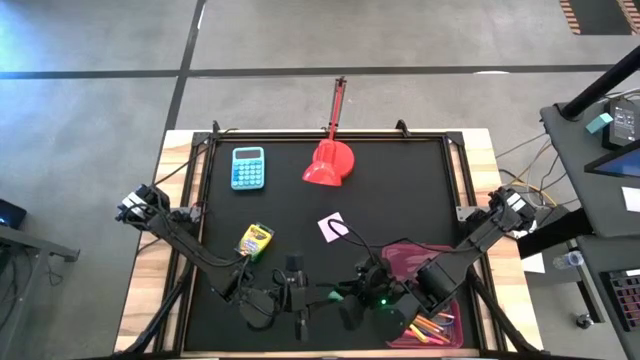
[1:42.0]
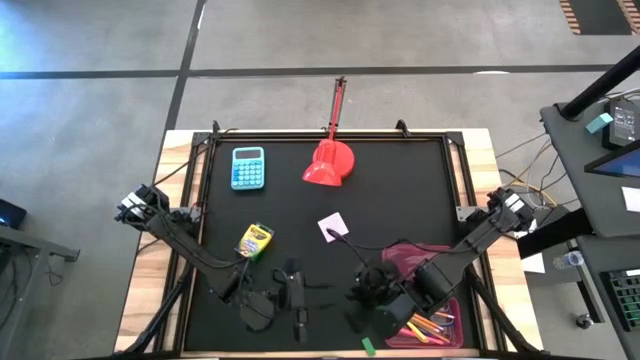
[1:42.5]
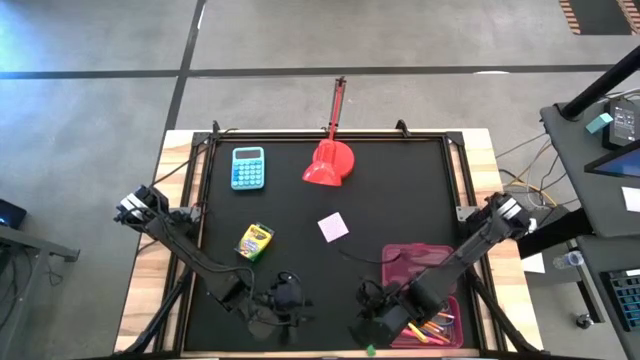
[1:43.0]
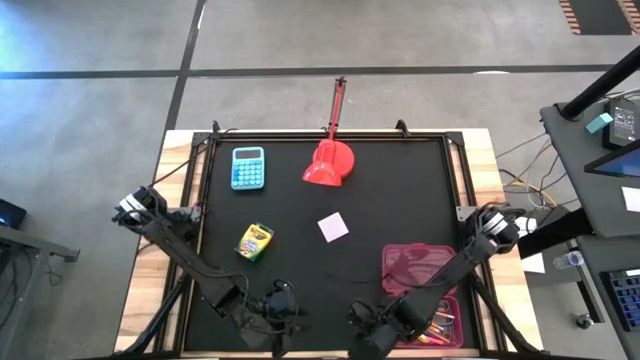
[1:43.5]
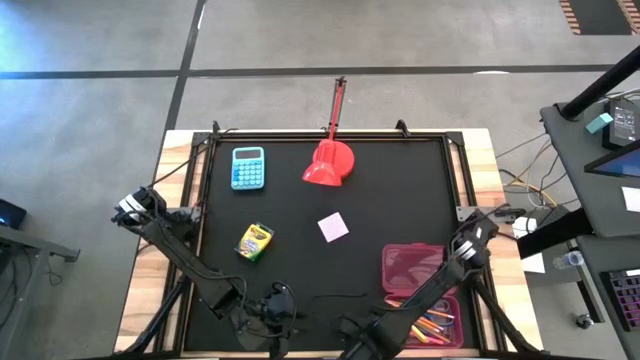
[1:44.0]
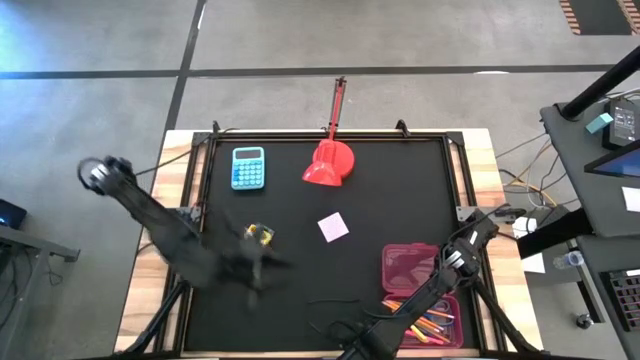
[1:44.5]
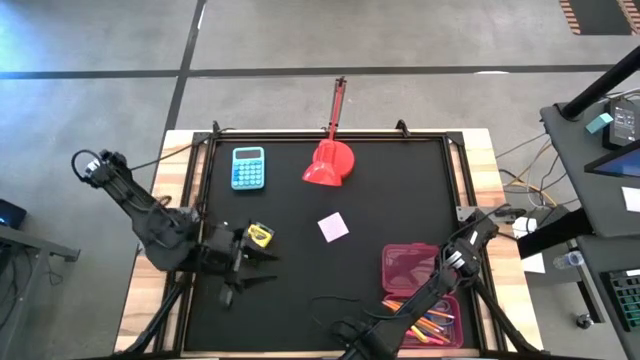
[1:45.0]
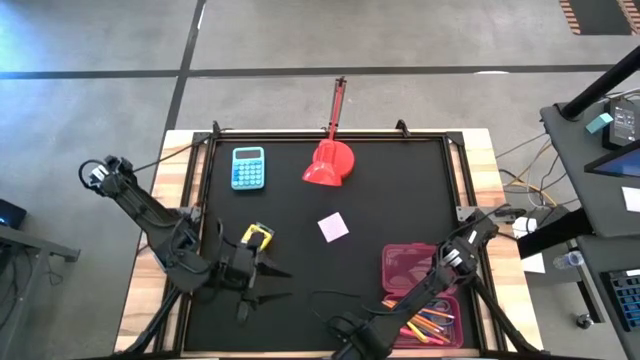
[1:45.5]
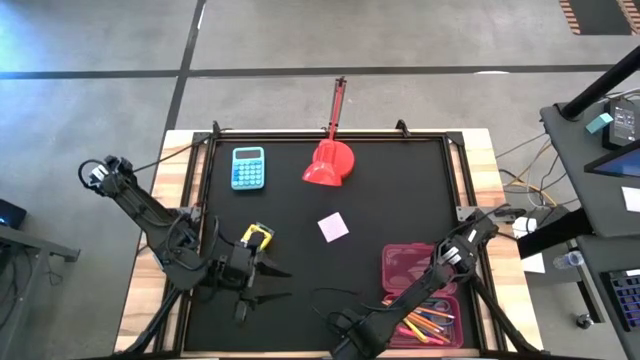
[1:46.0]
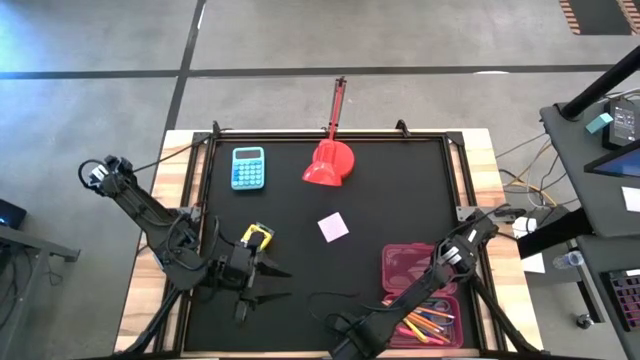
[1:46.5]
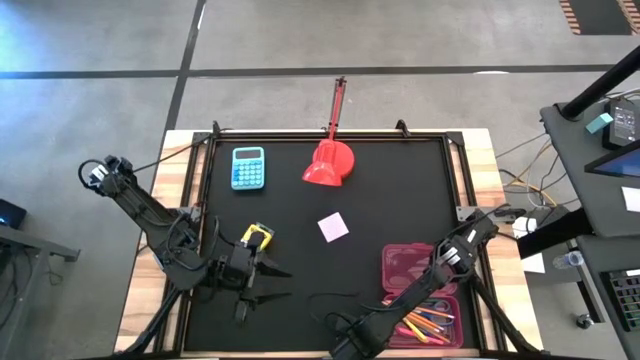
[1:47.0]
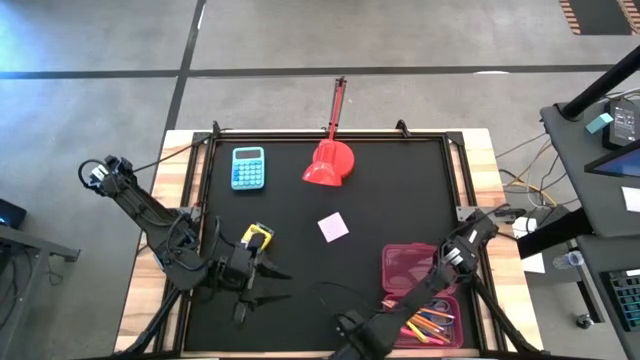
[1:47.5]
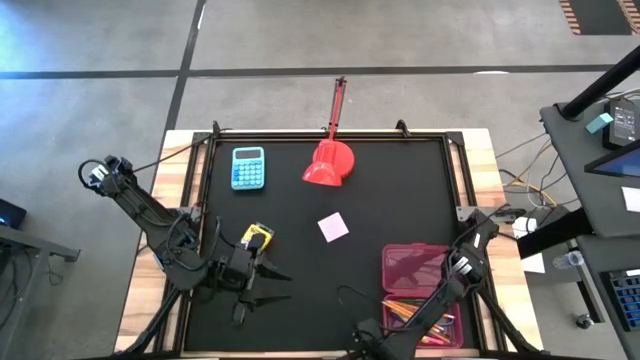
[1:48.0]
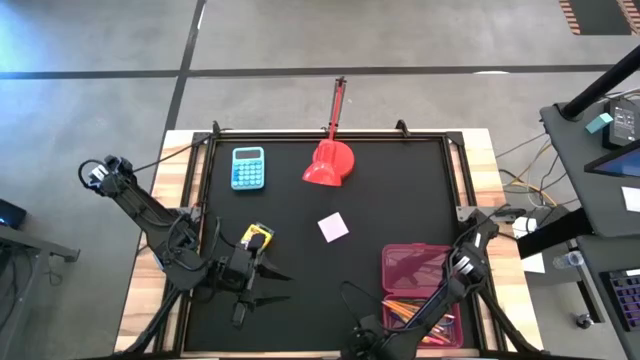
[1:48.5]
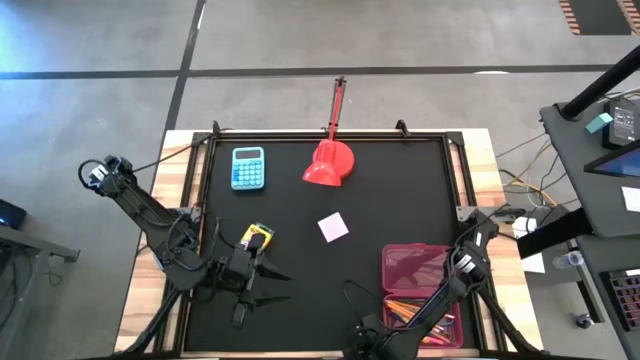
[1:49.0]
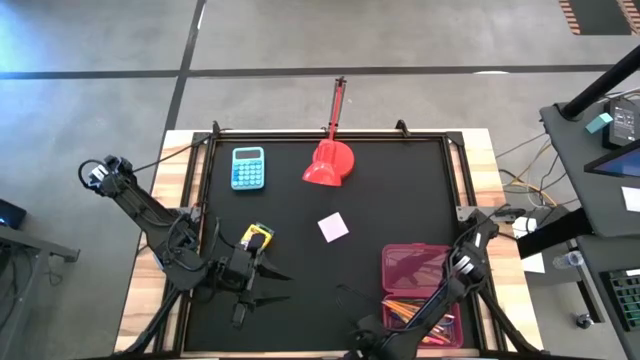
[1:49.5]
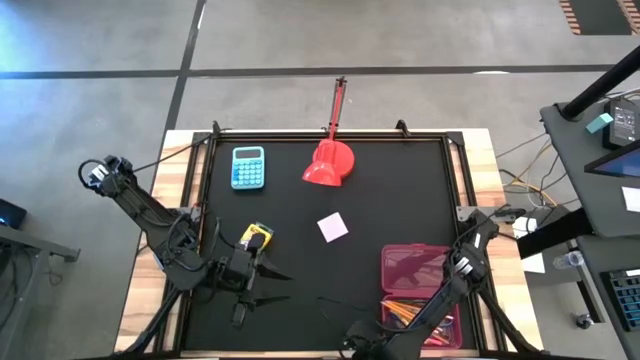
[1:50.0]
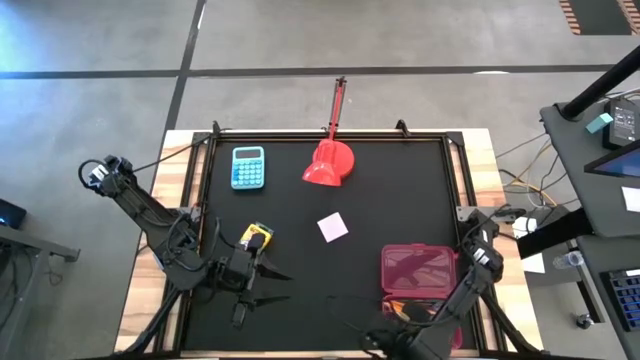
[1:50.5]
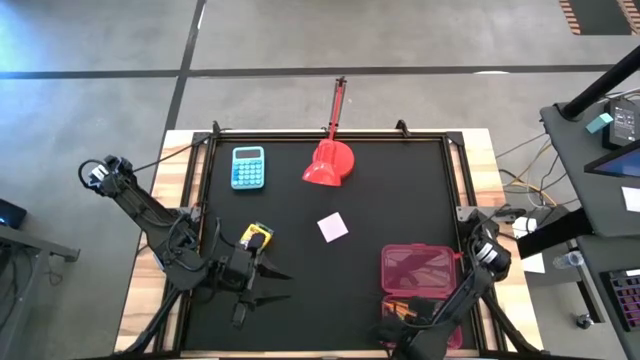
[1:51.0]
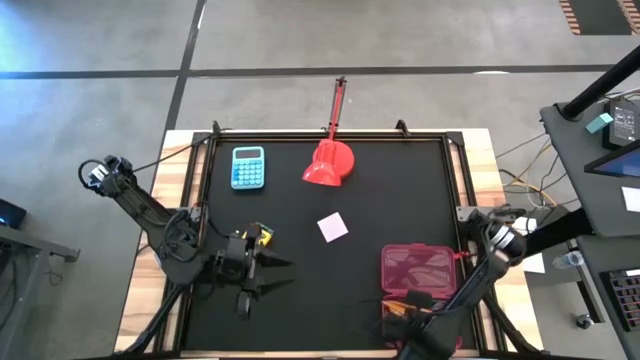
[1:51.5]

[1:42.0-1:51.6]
Task: Pack school essentials
Put the green eraser into the pink supply box

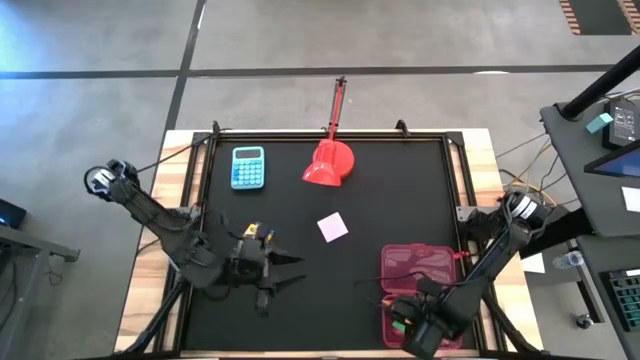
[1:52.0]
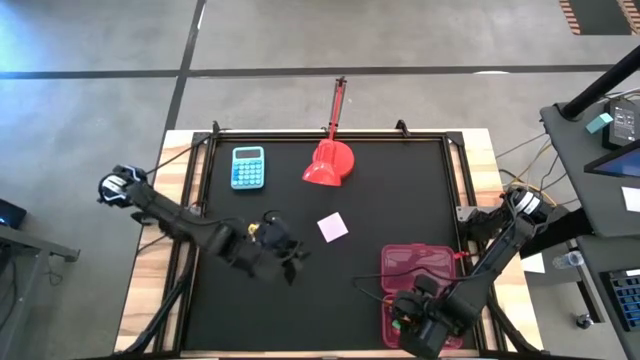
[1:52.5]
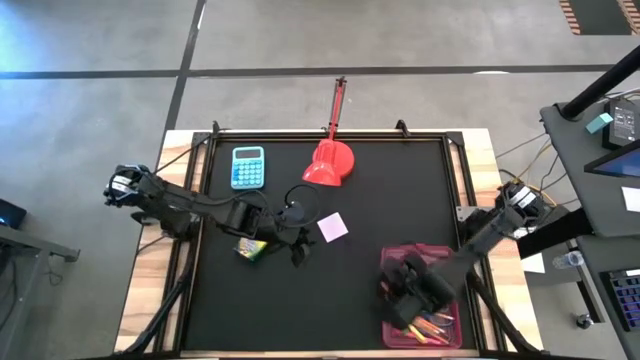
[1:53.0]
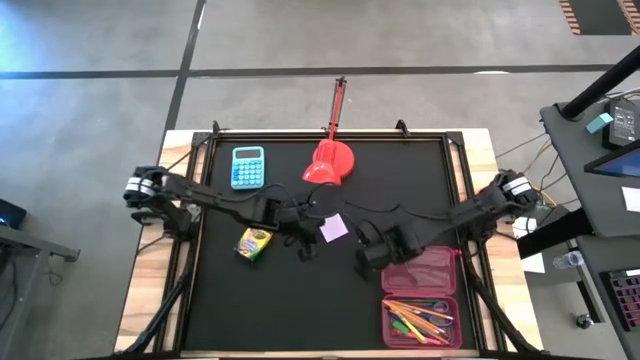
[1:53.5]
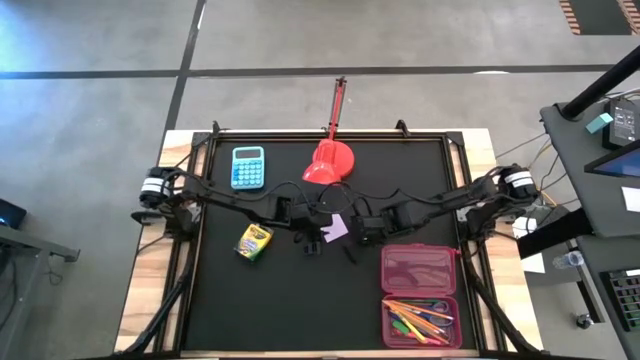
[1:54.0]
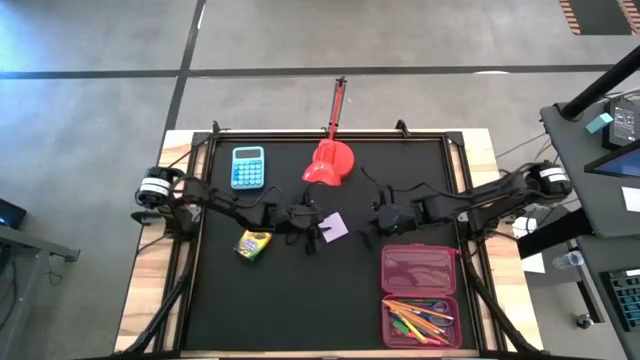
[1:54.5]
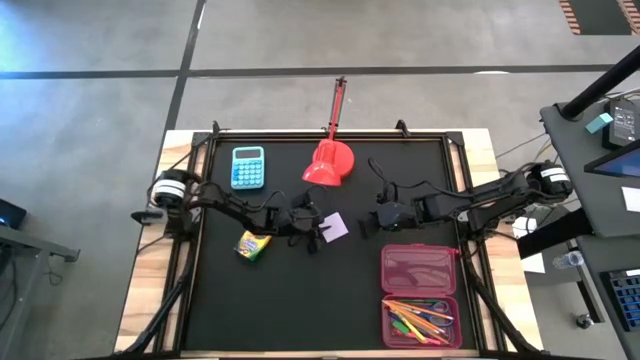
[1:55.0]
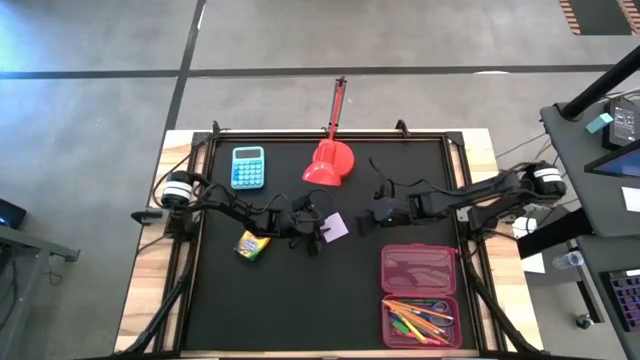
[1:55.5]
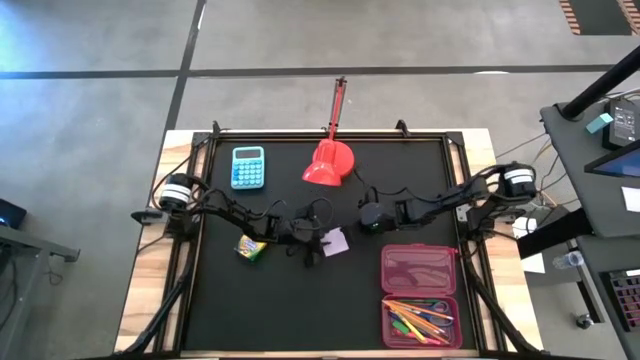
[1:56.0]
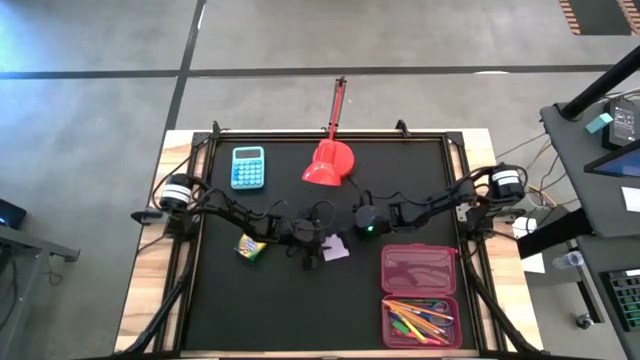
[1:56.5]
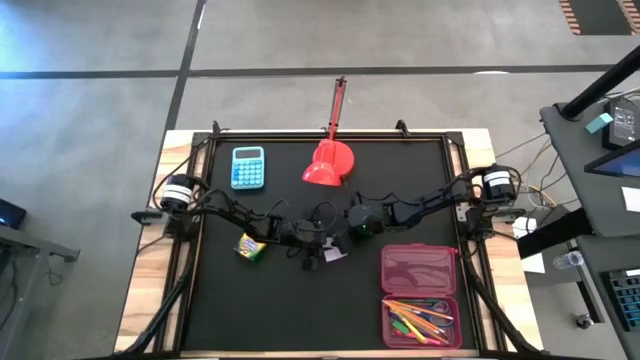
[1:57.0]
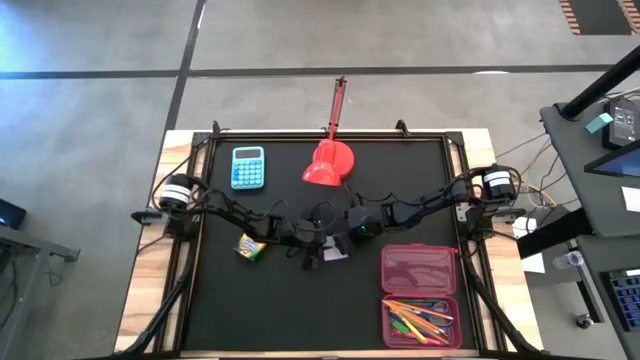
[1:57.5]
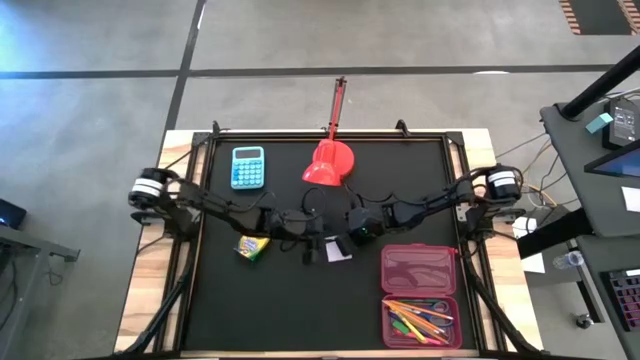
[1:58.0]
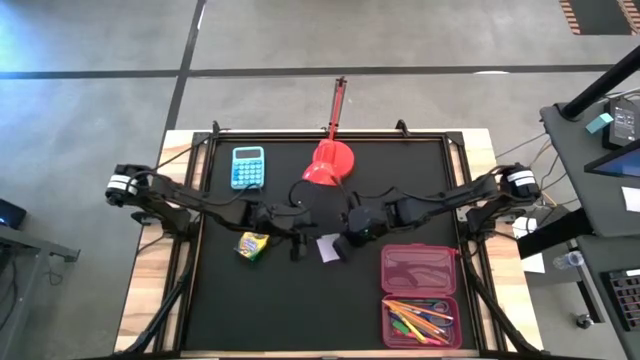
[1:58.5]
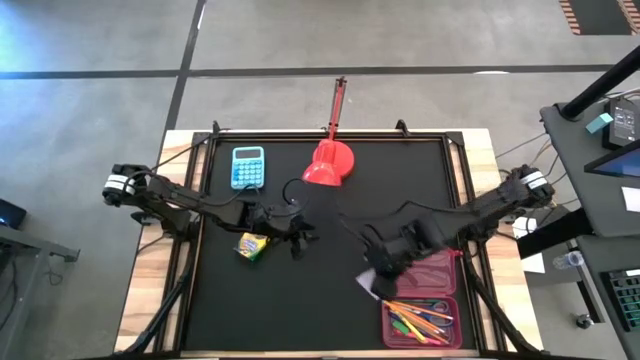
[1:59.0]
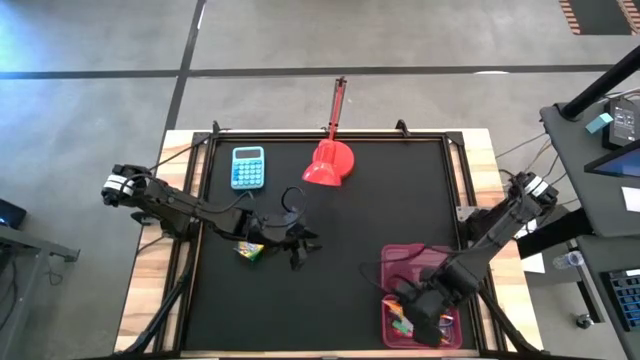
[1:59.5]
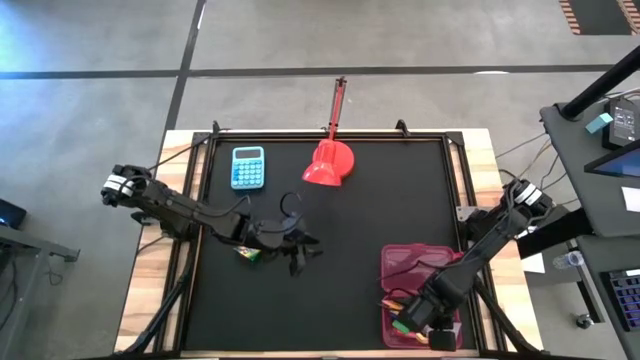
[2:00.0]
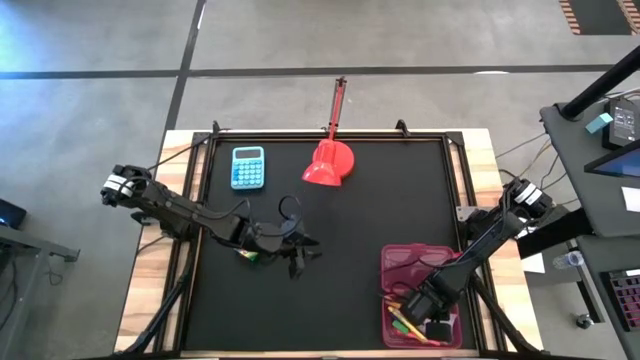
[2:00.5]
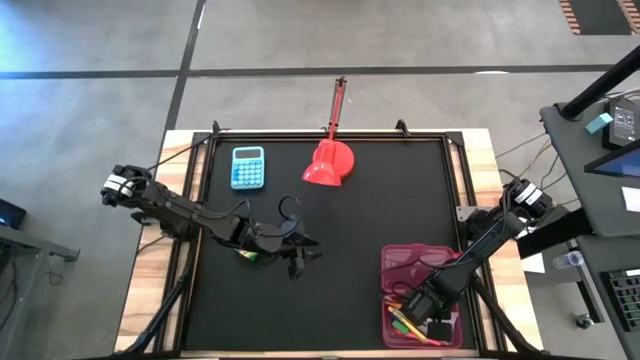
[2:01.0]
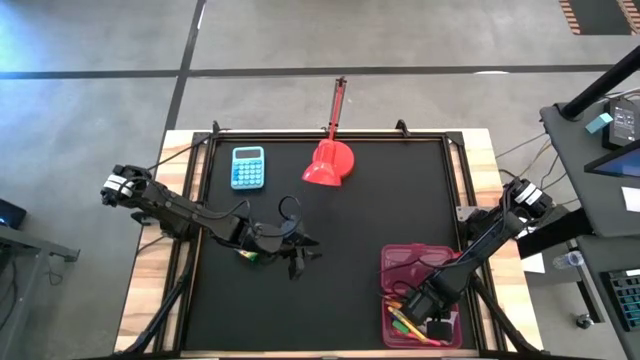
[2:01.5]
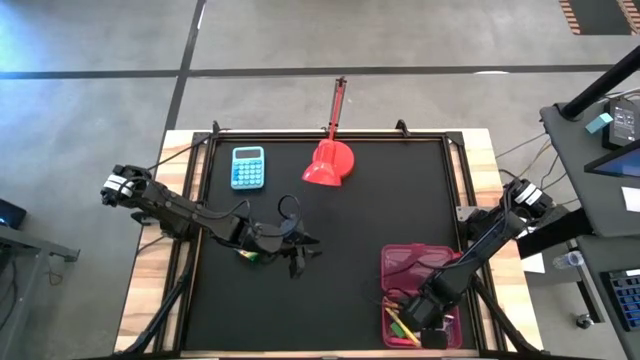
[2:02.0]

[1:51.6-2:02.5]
Put the violet sticky note into the pink supply box

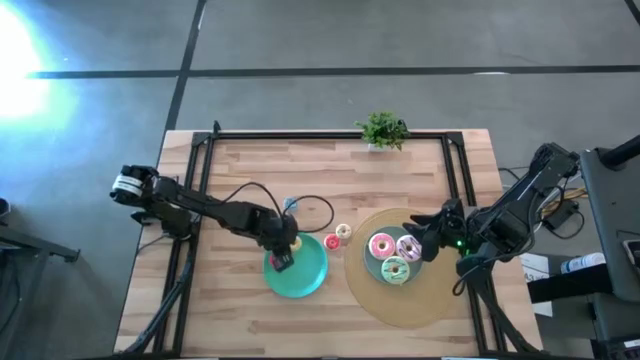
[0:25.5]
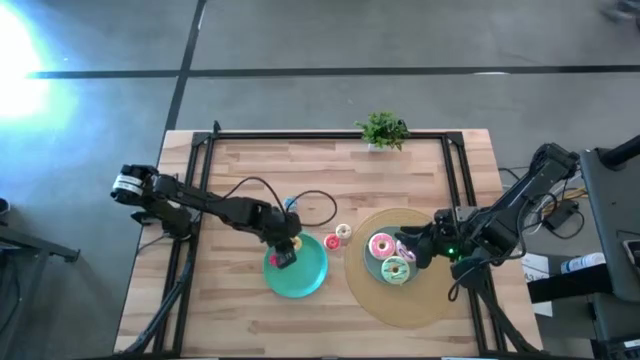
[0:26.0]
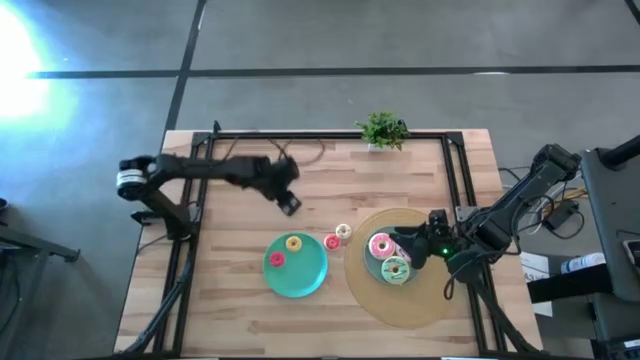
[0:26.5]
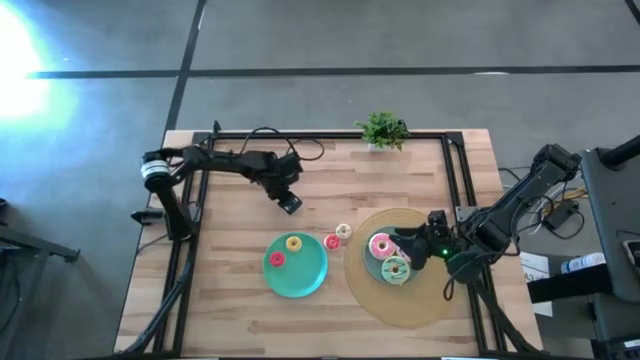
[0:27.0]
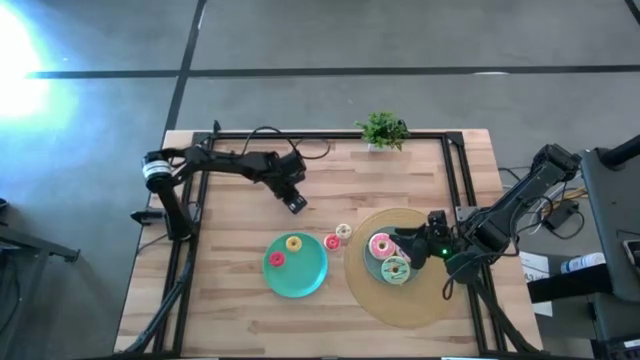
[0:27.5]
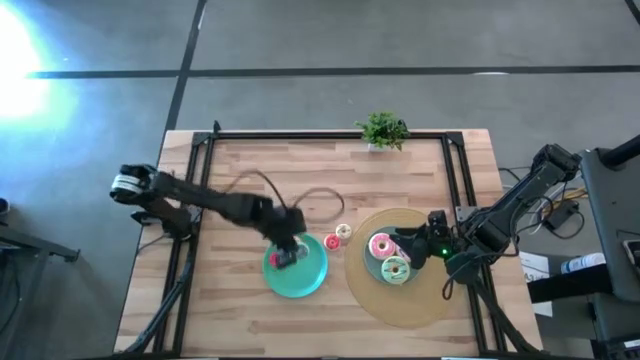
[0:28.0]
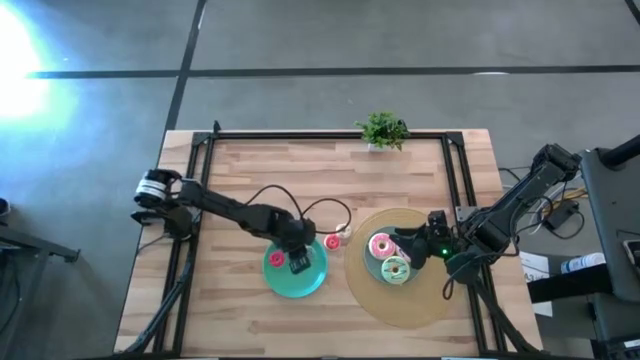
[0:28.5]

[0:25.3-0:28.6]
Task: Pick & Place donuts
Put the small blue donut on the blue plate
